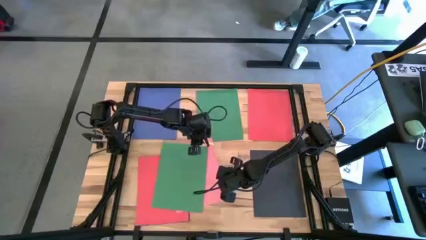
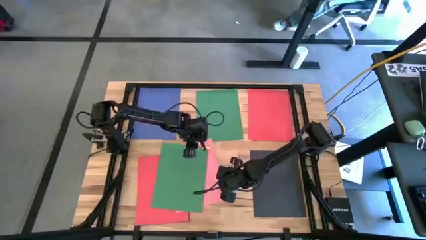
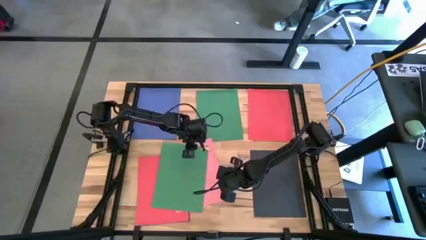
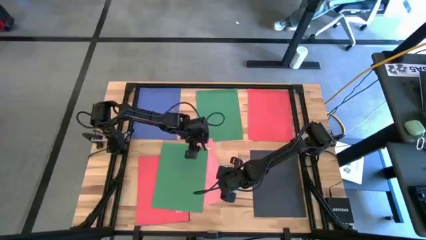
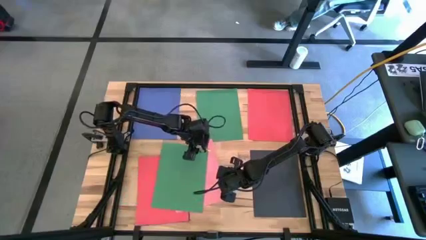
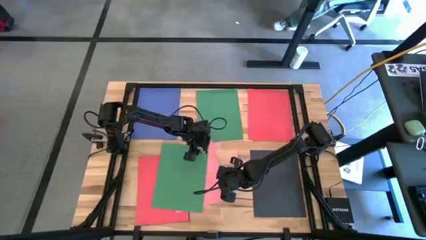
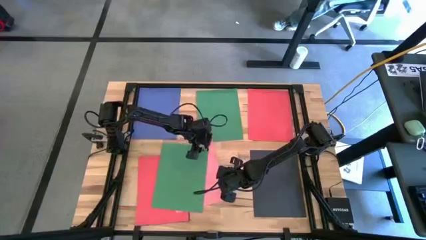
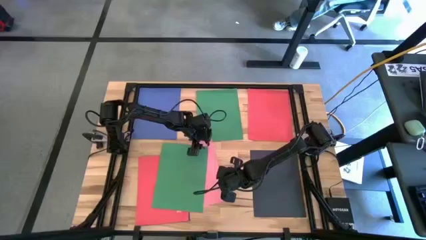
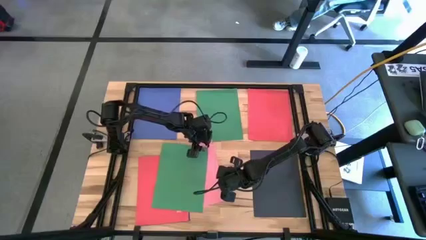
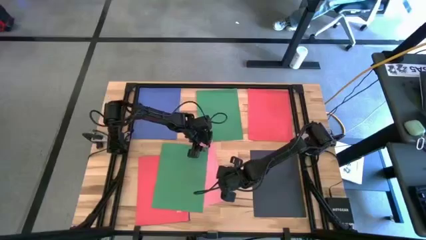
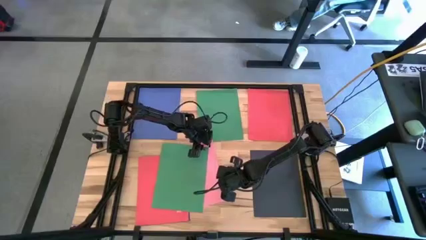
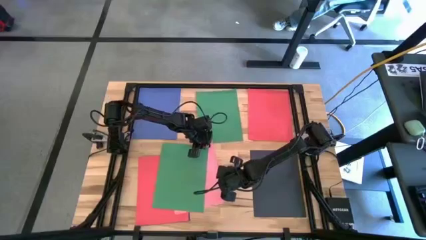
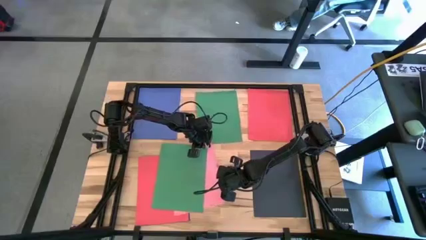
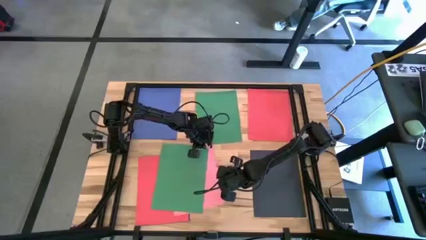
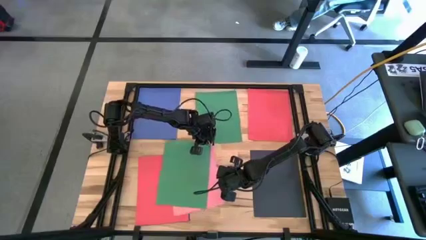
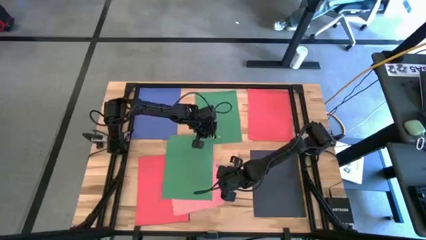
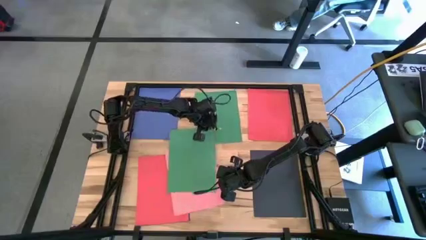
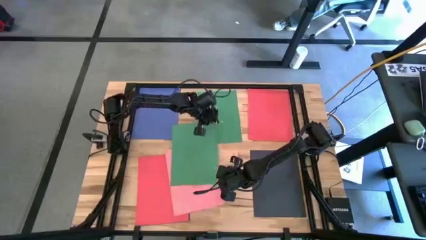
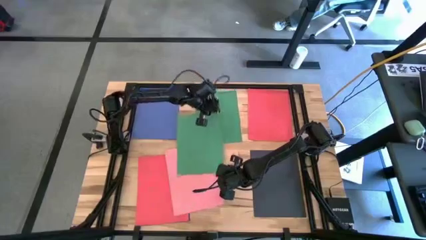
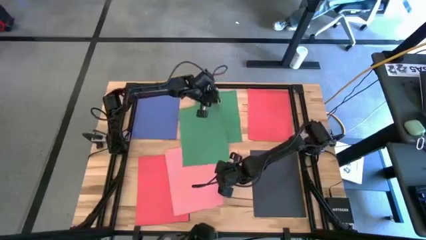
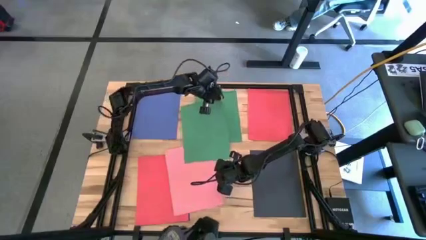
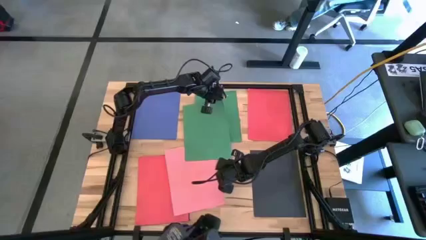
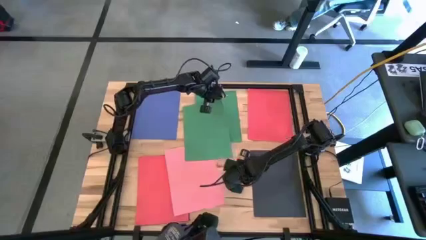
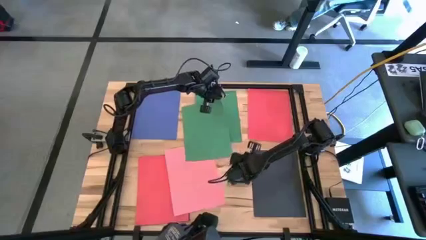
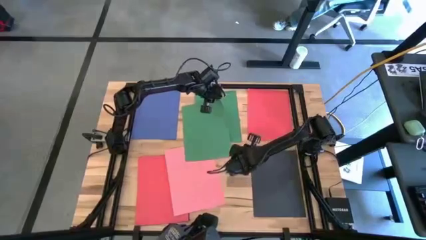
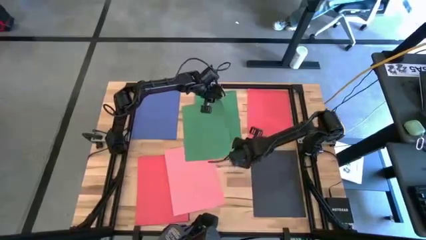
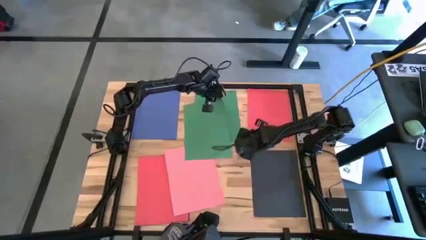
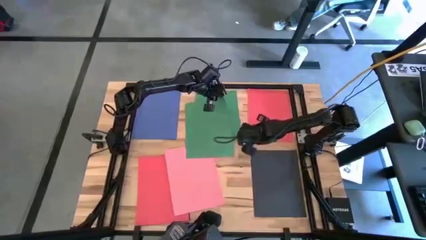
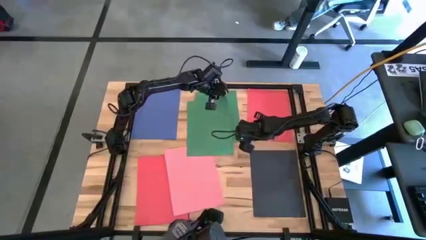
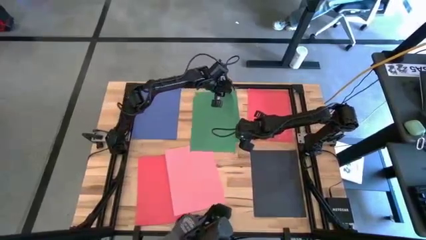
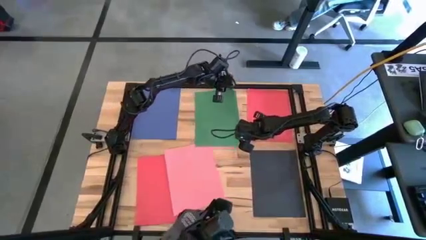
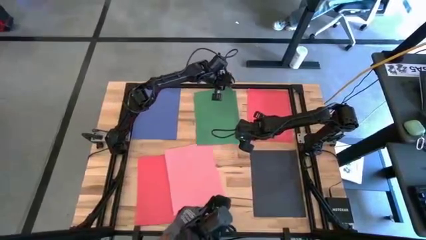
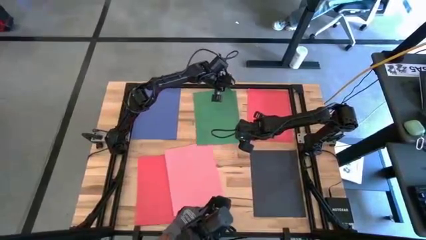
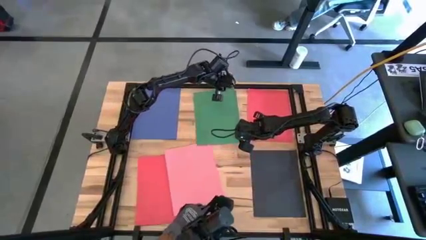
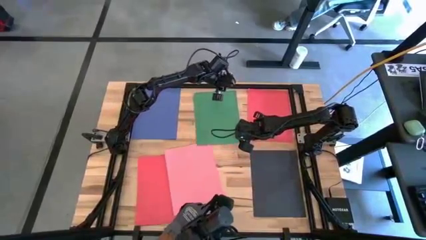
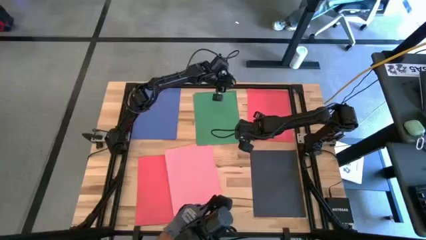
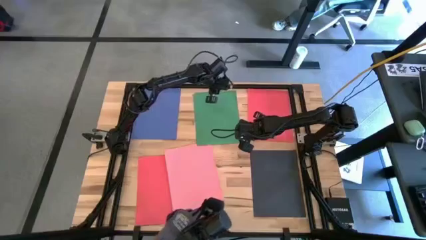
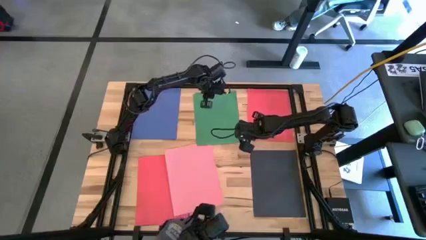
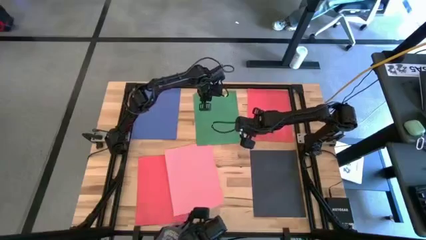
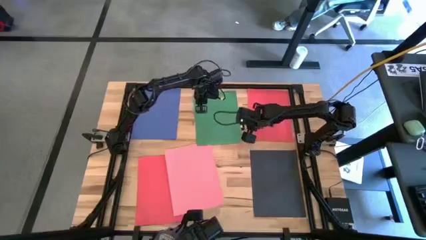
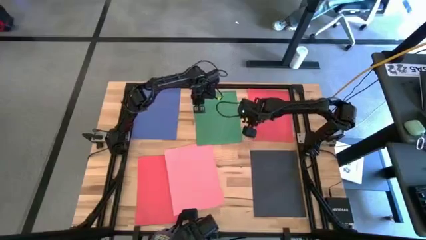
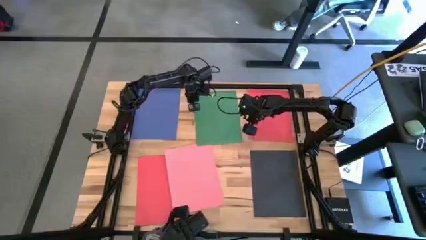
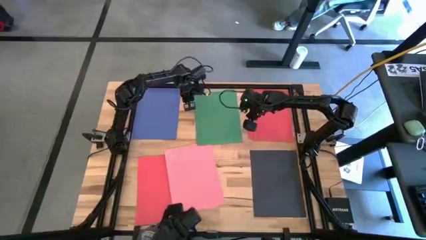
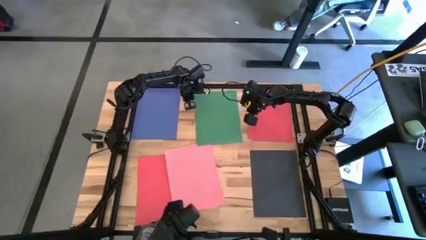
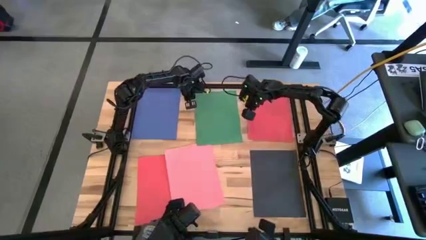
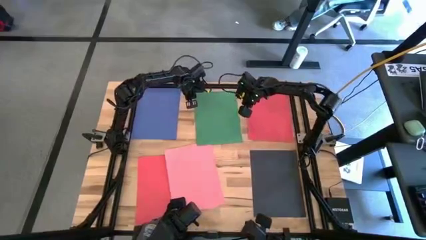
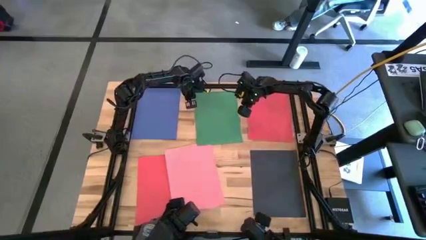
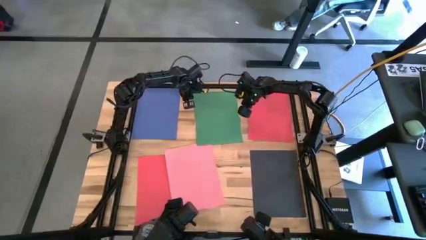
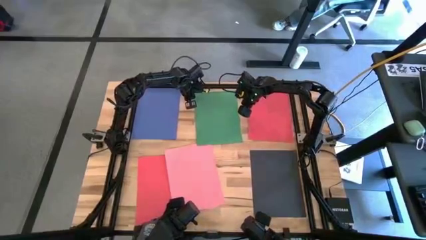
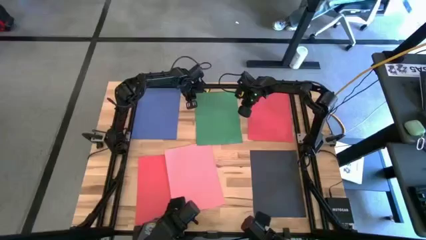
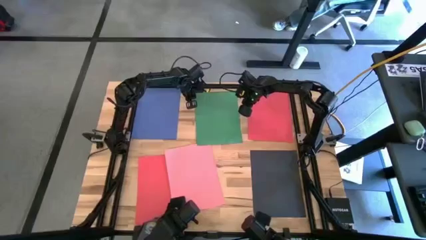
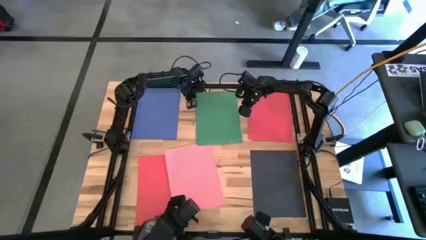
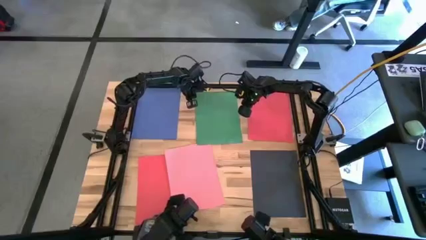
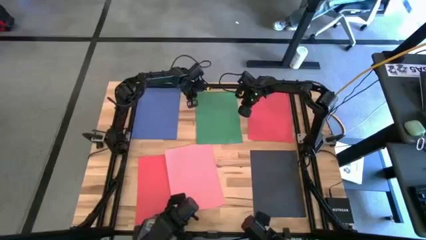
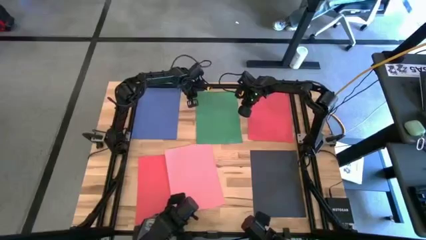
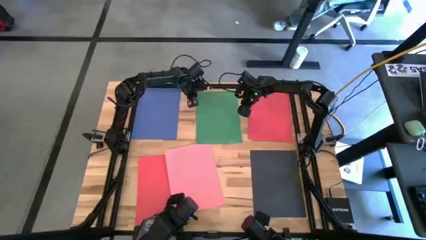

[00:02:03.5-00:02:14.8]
Task: Organize paper
Stack the green paper on top of the other green paper

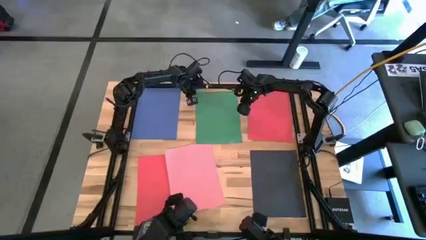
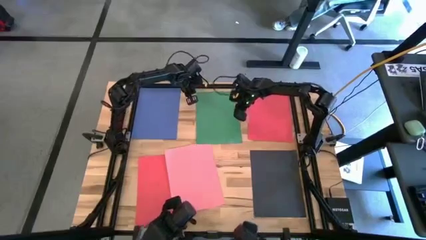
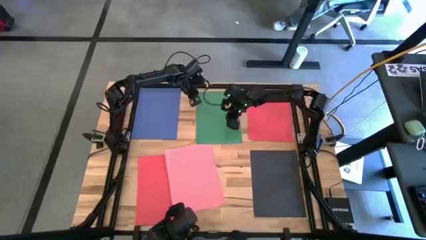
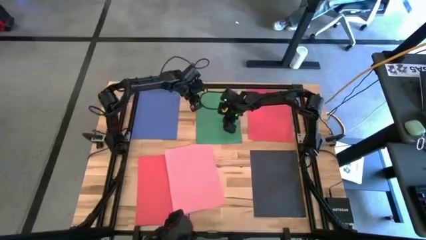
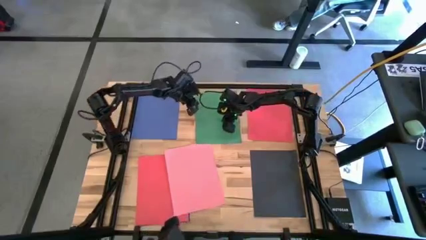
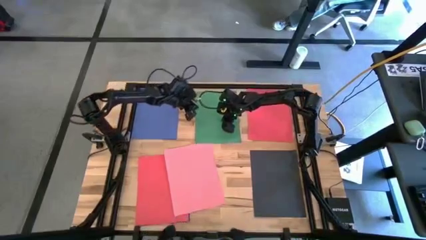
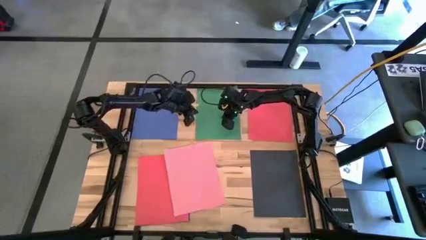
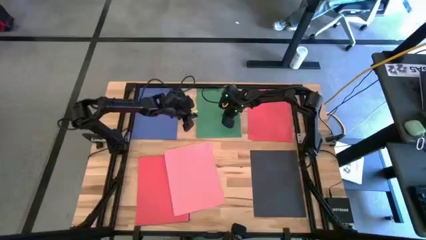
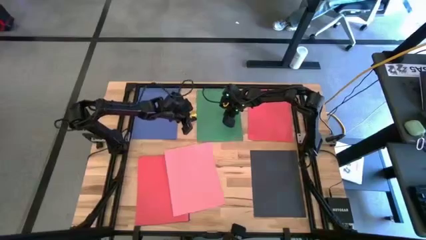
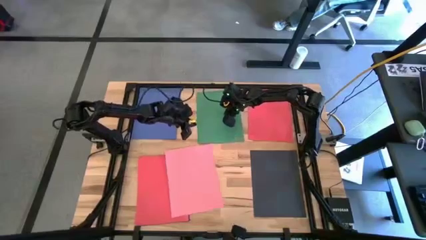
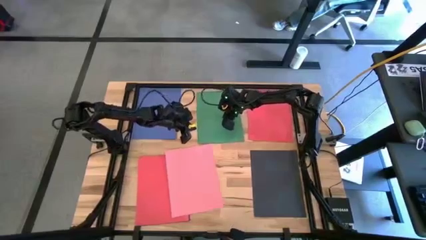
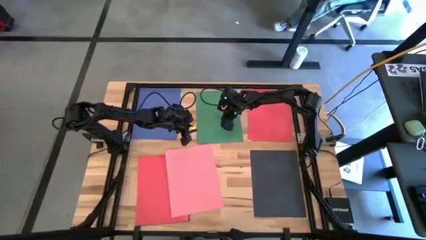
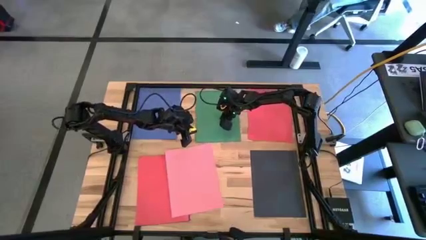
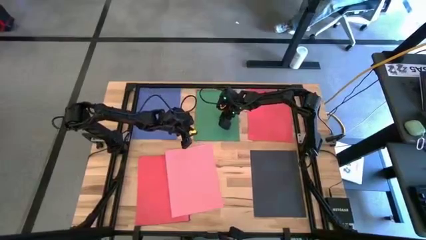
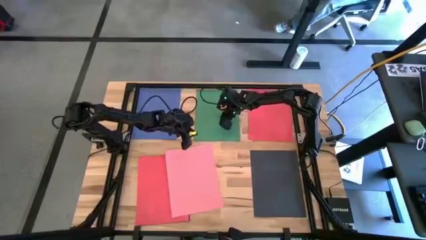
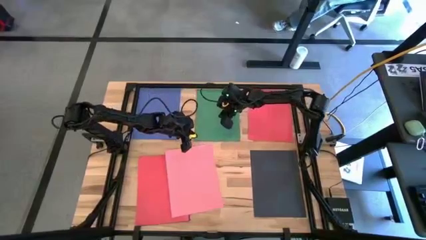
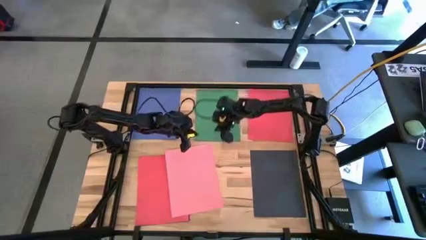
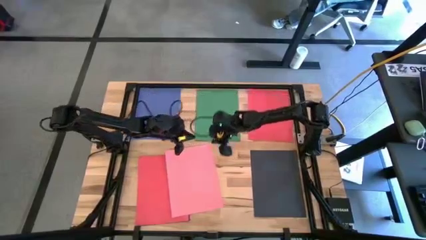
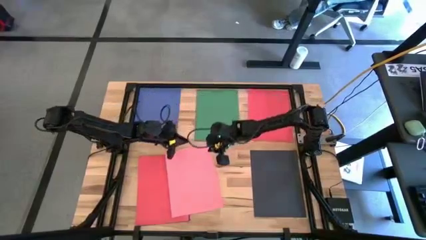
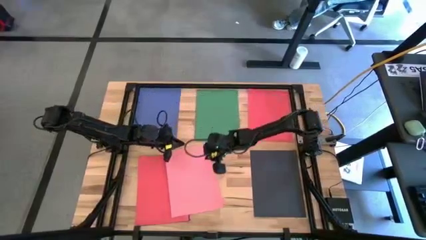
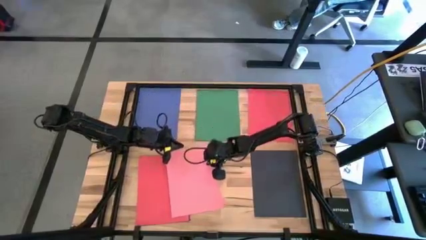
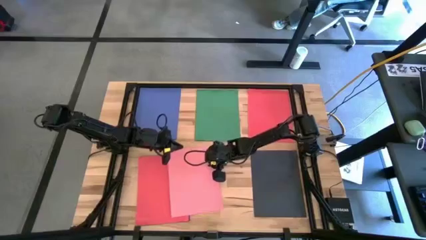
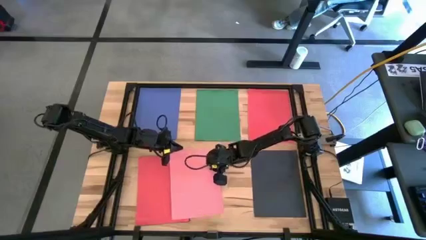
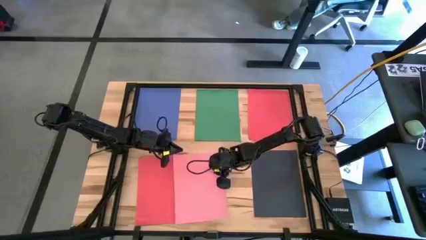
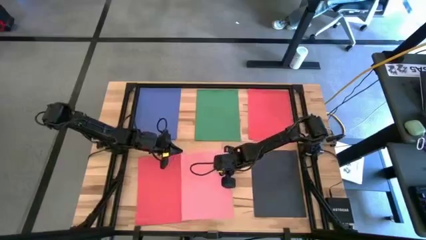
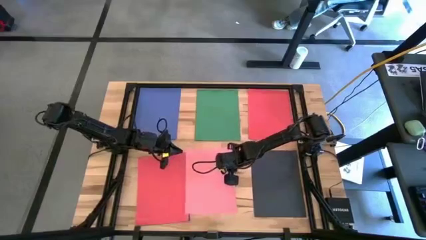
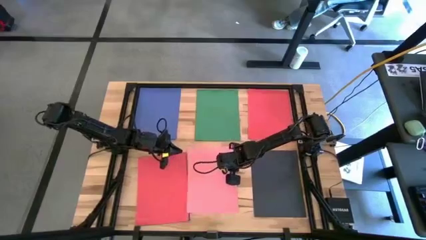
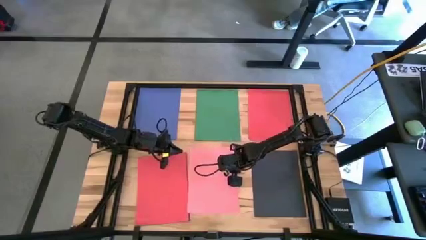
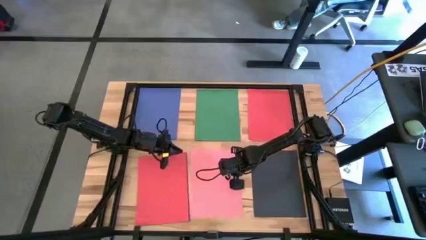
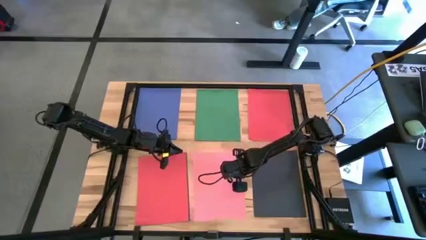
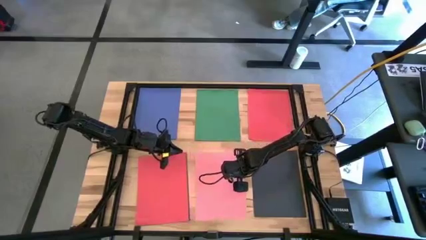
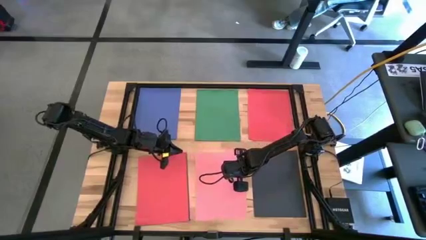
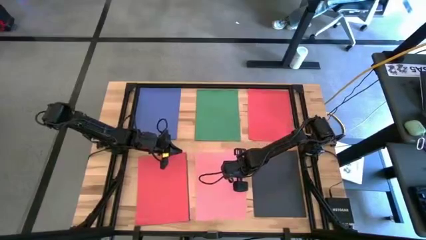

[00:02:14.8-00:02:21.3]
Move the pink paper to the bottom middle of the table
